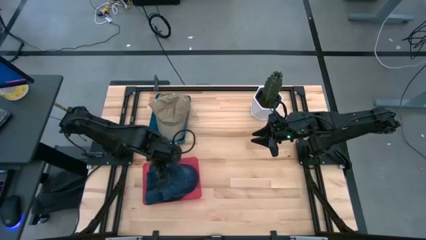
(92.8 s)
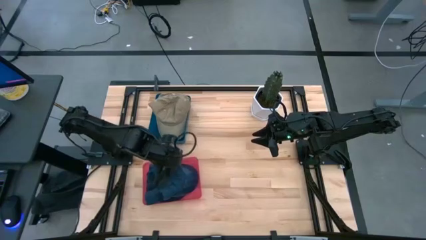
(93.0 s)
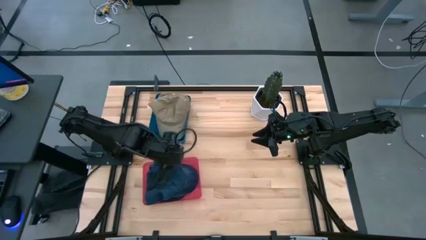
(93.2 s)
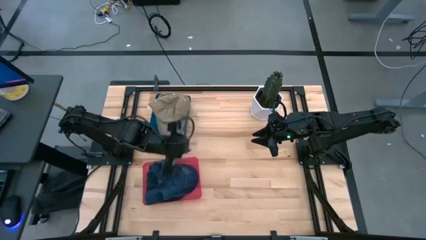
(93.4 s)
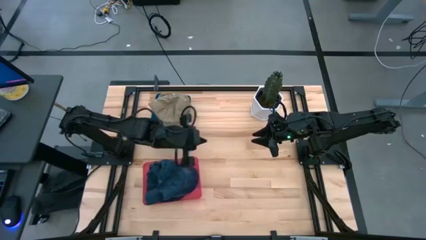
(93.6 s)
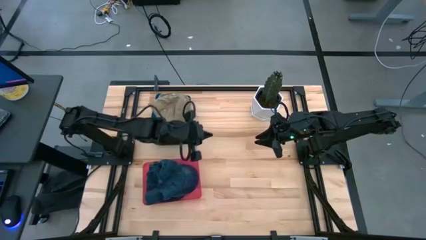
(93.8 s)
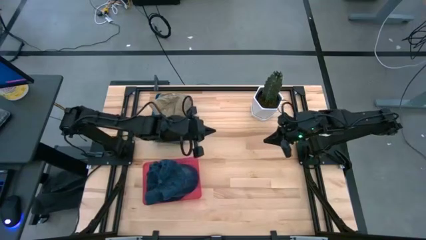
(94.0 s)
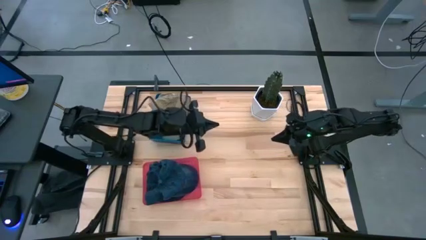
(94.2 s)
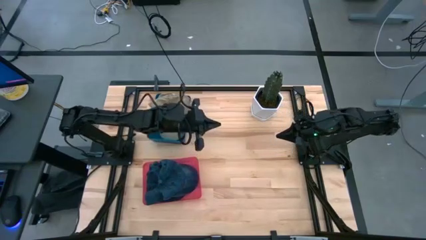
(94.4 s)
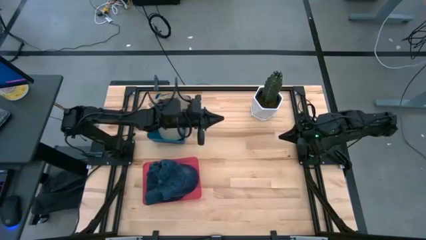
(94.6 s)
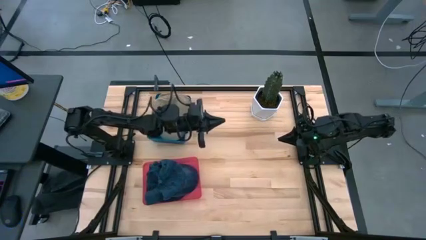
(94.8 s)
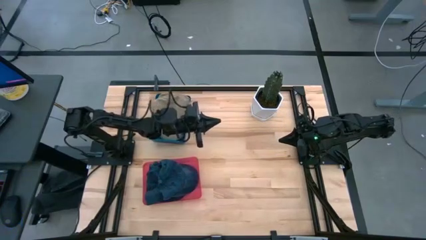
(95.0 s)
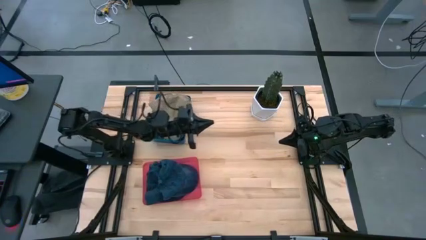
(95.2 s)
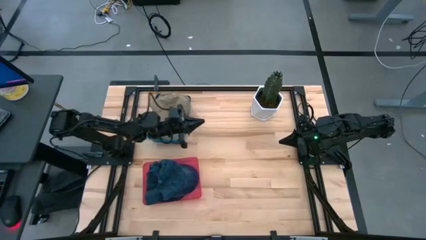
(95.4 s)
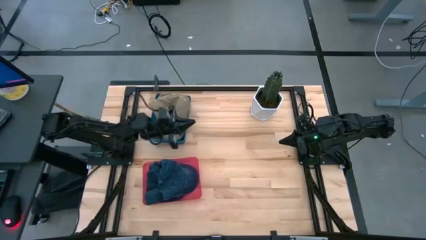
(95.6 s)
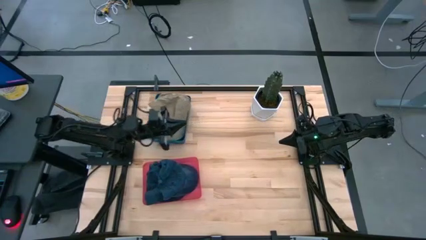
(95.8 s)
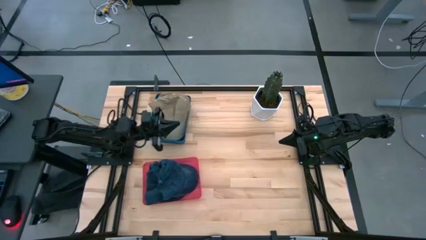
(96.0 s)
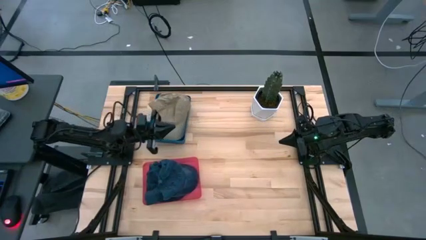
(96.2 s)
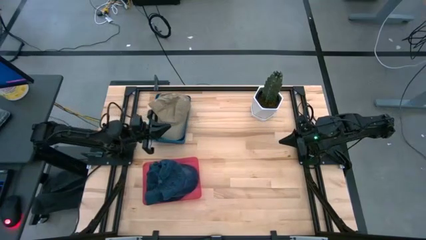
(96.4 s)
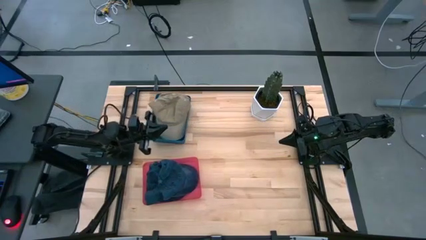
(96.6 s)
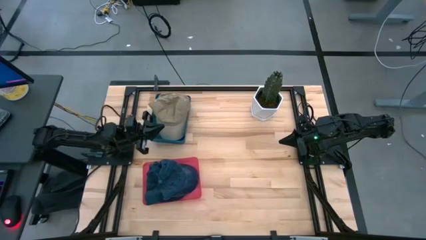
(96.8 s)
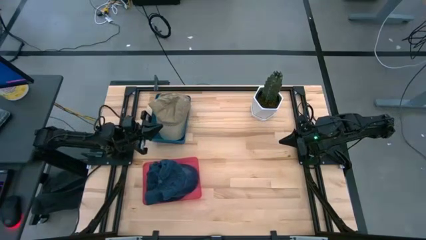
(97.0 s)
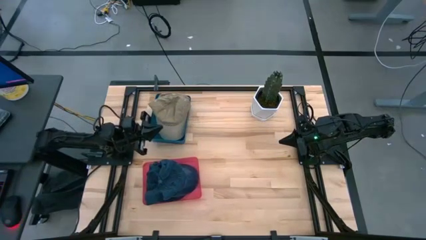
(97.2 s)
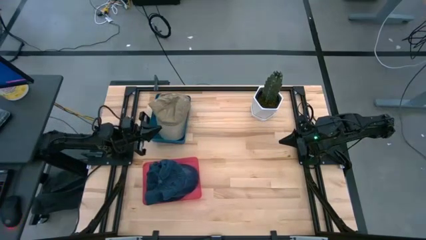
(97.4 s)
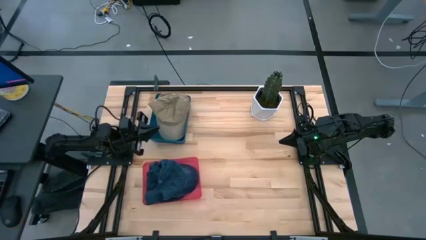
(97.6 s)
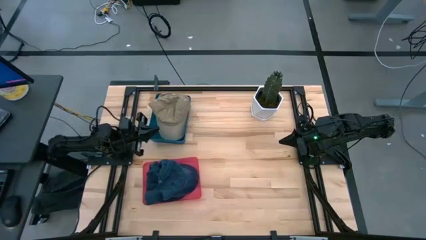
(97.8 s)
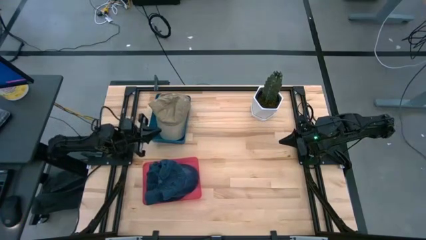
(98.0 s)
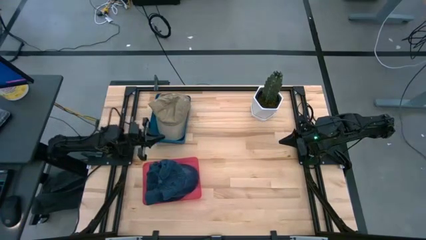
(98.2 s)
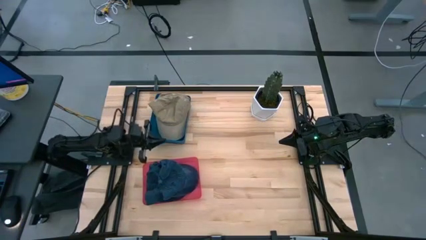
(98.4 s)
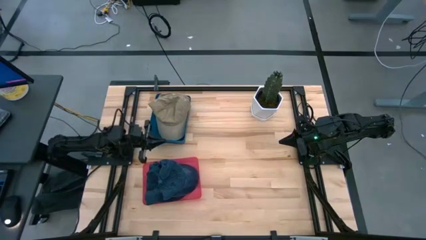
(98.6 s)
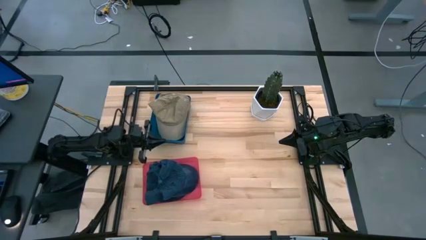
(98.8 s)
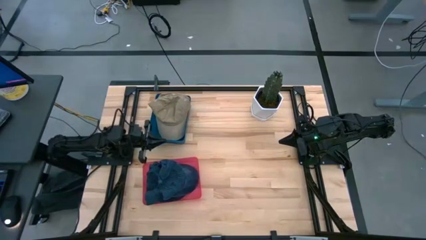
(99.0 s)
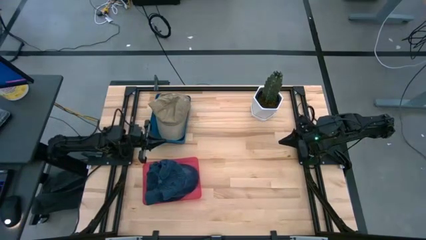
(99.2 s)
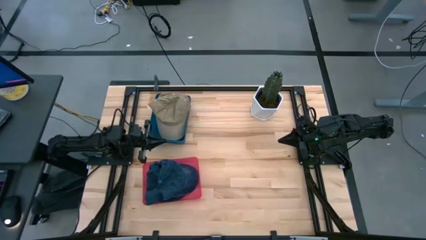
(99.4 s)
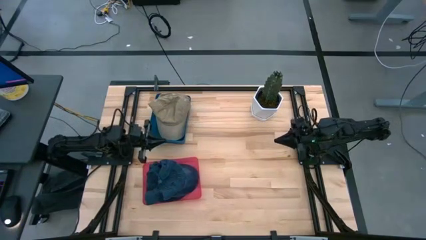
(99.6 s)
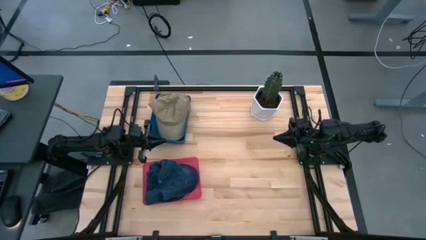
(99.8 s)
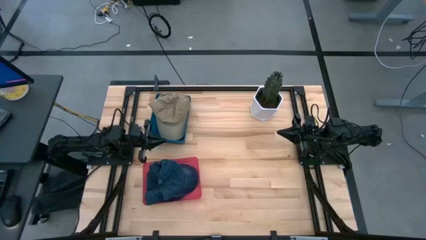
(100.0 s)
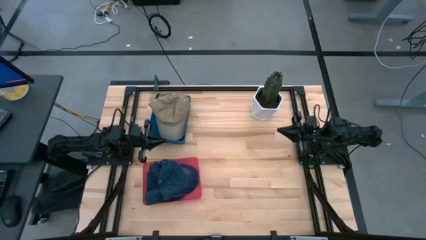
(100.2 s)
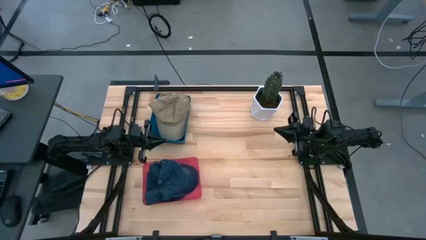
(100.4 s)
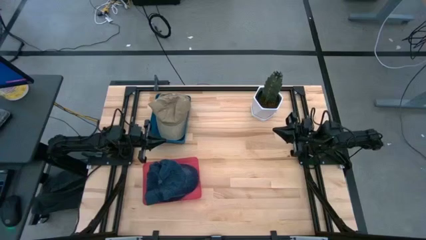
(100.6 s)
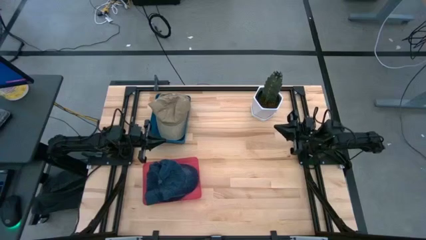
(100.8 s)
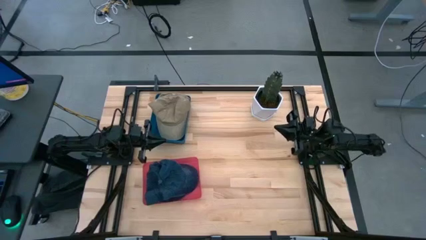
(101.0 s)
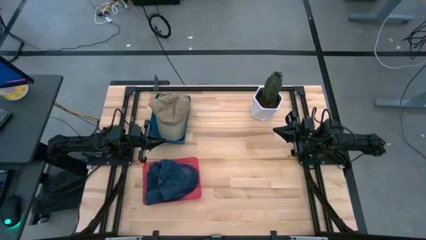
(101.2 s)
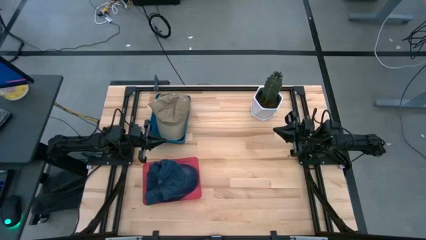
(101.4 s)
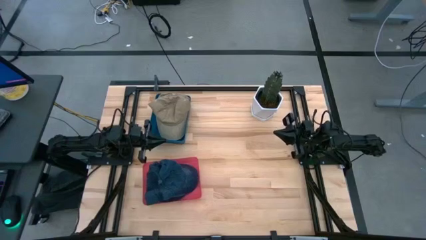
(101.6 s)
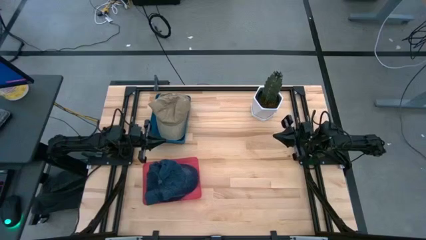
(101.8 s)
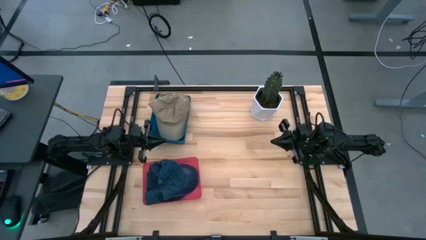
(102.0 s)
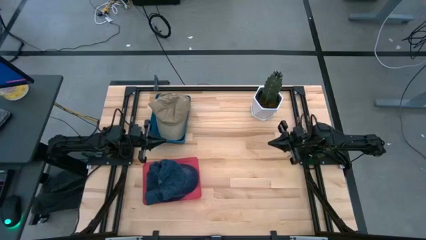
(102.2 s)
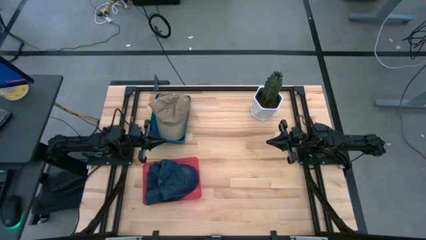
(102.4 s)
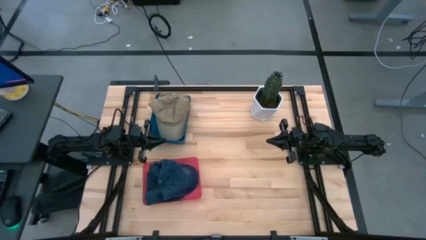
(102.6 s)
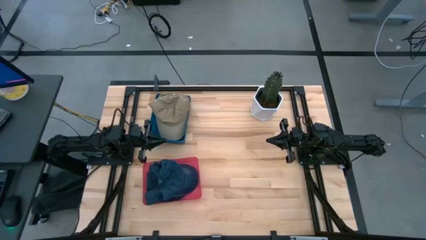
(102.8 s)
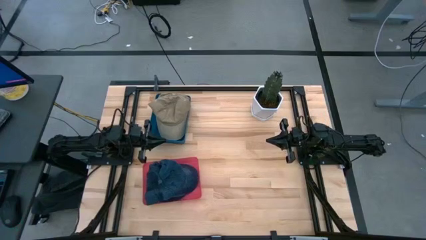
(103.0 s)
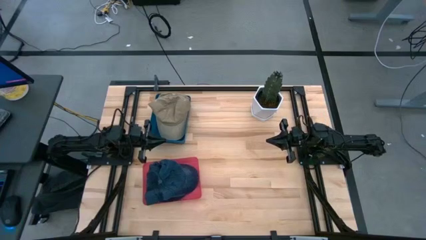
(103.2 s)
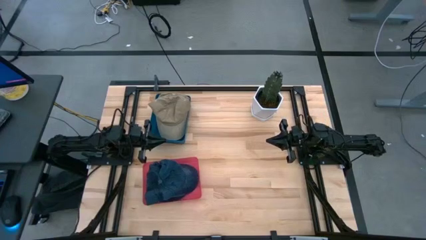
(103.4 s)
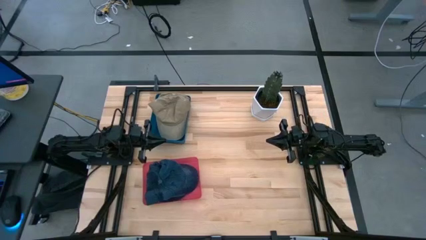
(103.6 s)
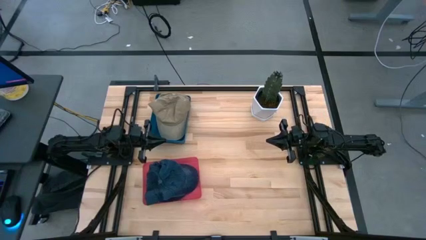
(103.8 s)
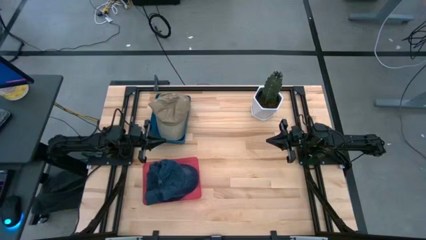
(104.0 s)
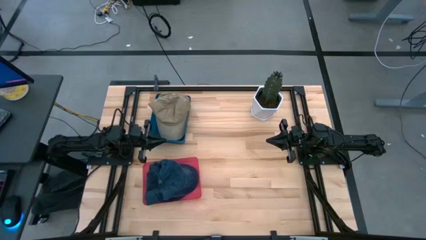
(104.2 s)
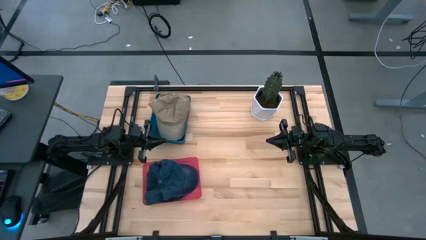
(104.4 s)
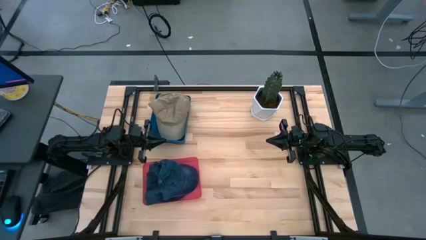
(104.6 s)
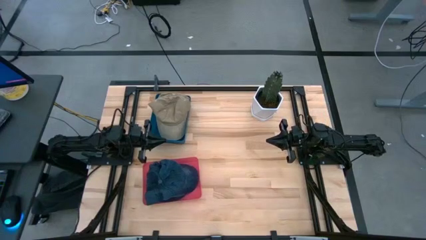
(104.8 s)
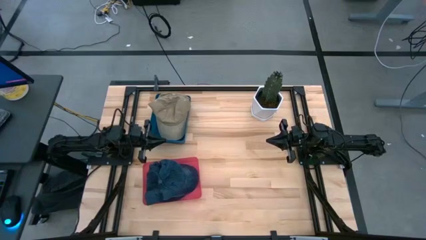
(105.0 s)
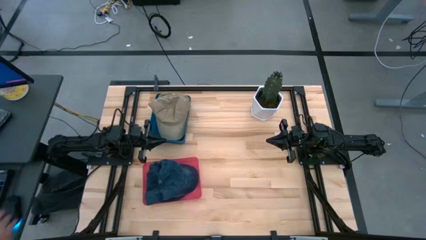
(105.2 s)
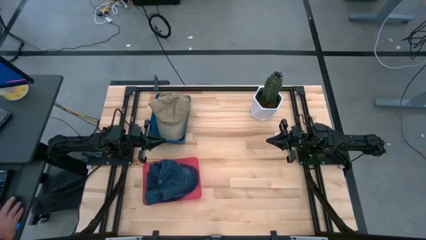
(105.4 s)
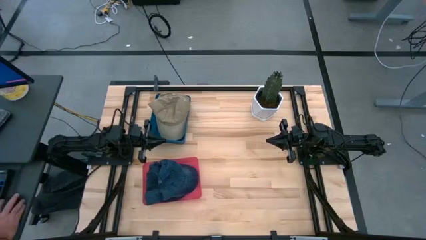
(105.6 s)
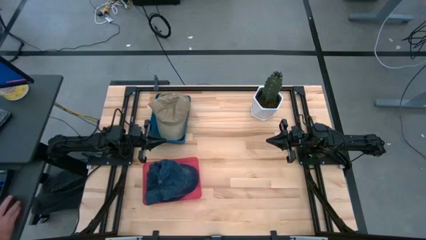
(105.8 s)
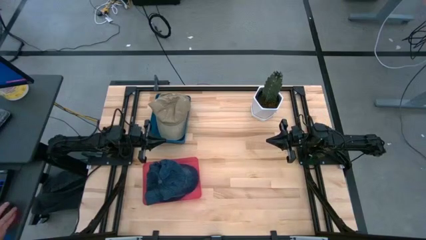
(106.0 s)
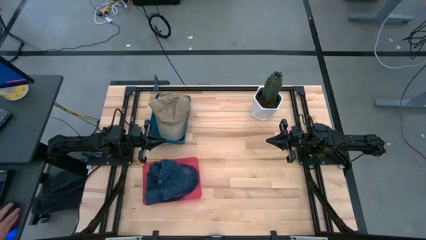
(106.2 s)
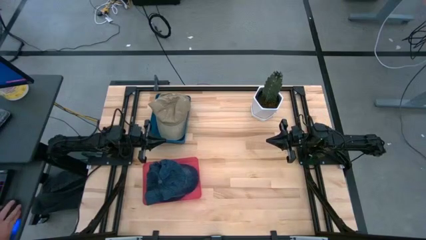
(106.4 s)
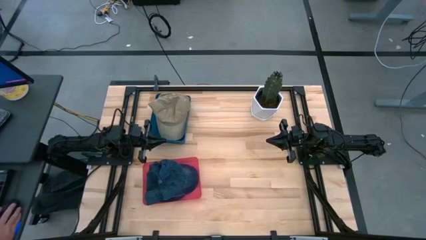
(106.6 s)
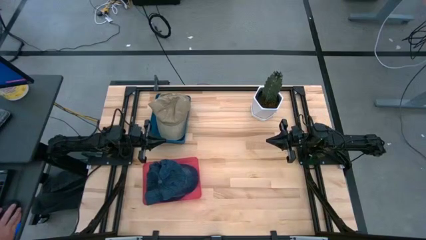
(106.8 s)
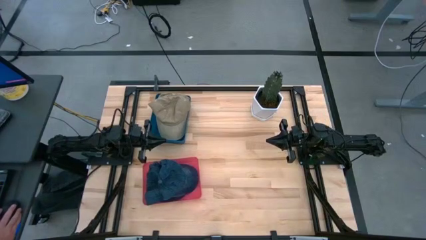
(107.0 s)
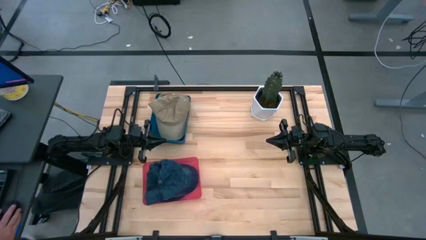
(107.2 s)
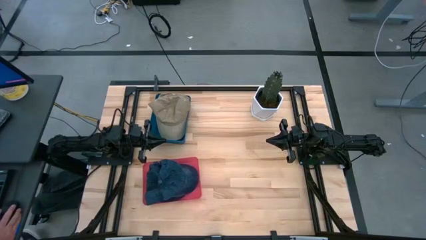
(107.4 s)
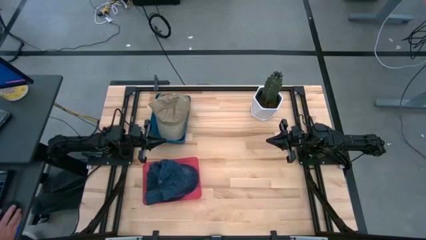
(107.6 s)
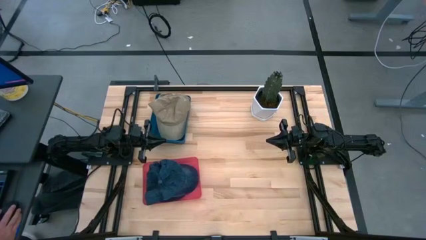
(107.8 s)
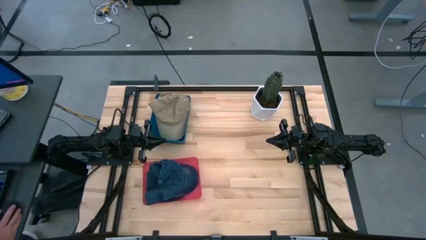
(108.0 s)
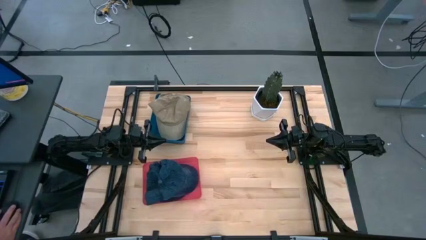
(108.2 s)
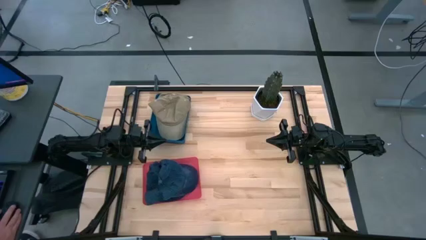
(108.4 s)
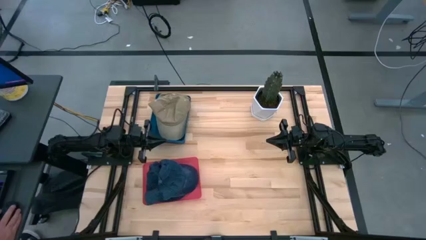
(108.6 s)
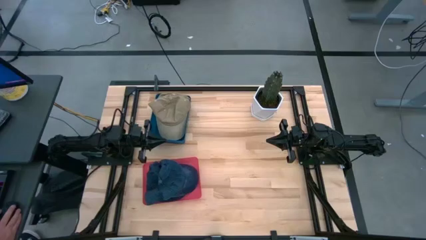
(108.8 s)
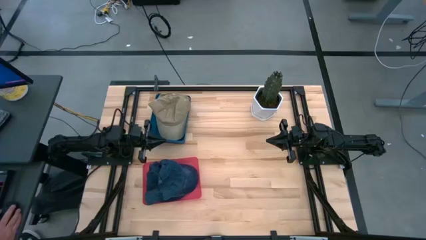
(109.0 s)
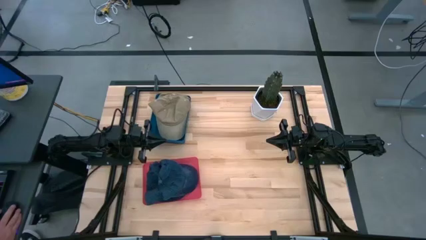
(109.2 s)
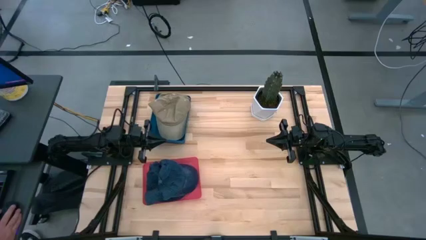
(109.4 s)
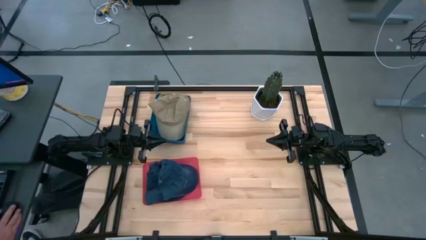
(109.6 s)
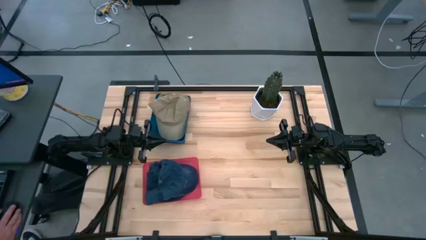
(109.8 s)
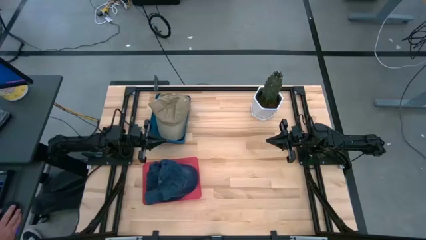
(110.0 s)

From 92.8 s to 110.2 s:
Task: Pick & Place hat
Return to Home Position
